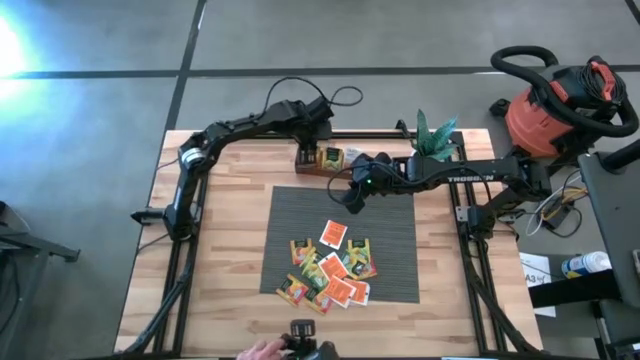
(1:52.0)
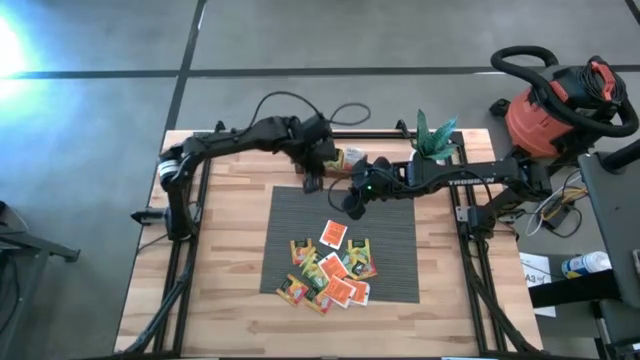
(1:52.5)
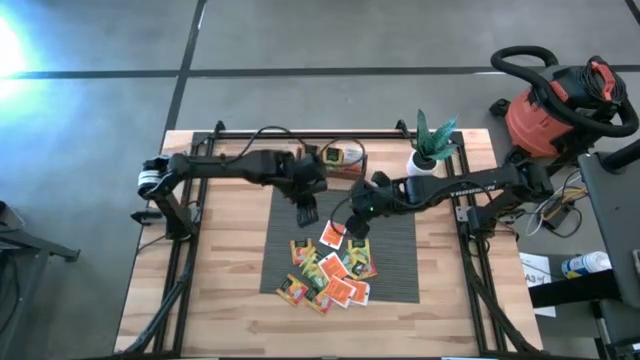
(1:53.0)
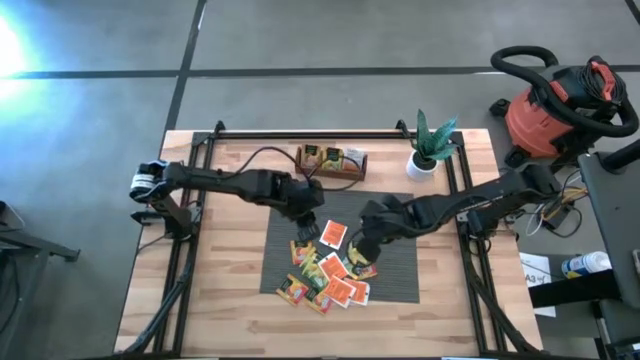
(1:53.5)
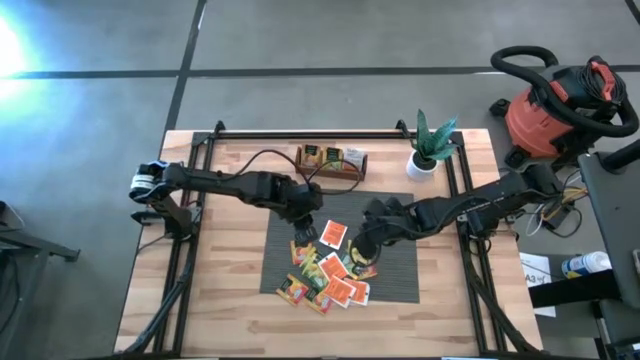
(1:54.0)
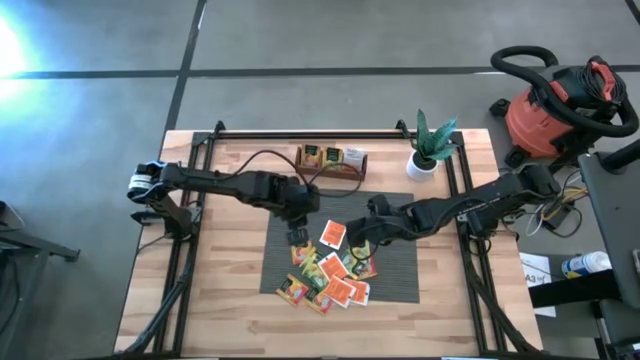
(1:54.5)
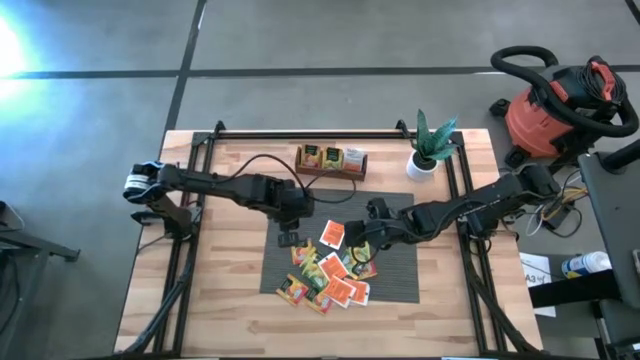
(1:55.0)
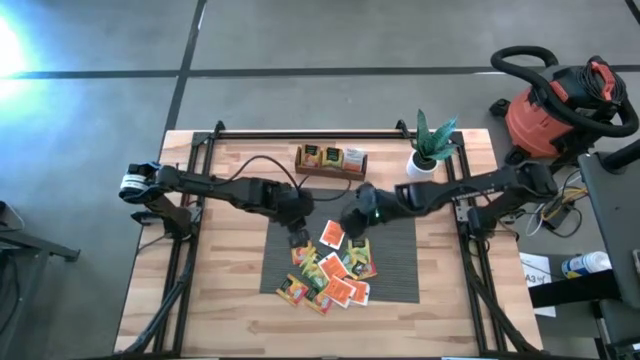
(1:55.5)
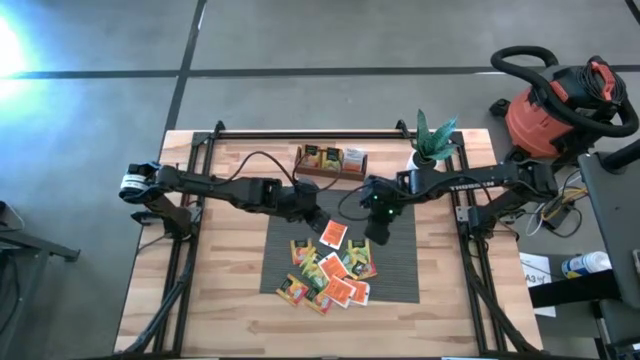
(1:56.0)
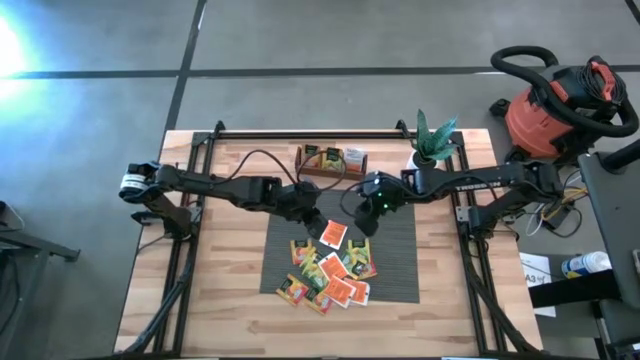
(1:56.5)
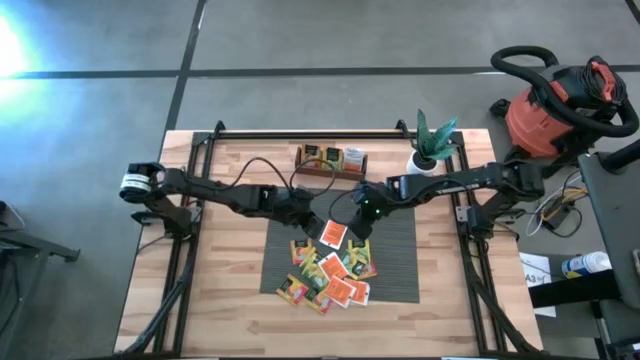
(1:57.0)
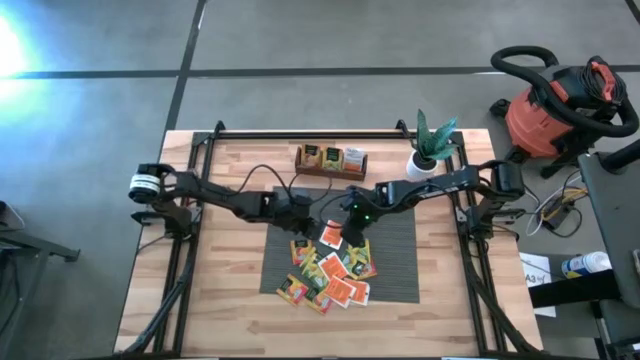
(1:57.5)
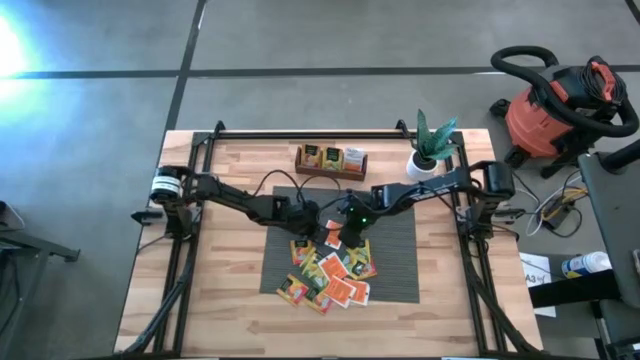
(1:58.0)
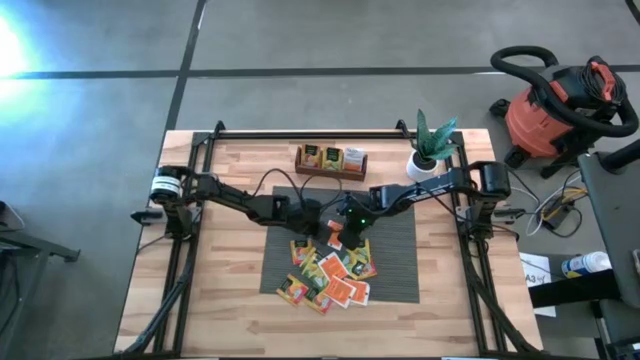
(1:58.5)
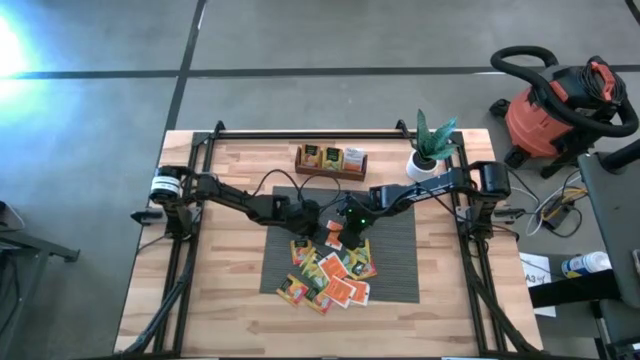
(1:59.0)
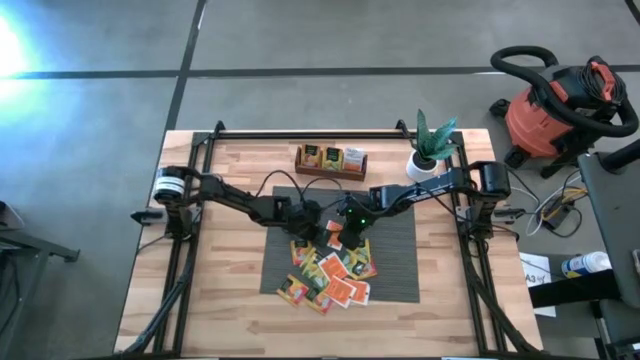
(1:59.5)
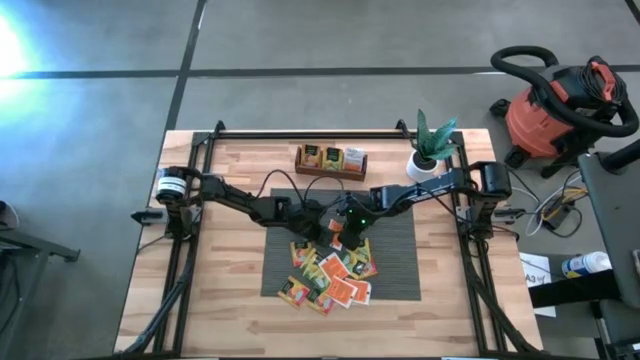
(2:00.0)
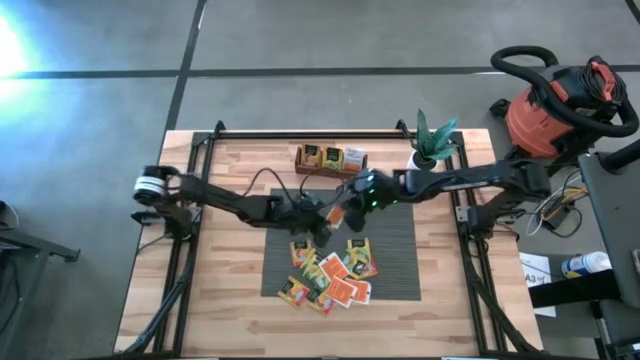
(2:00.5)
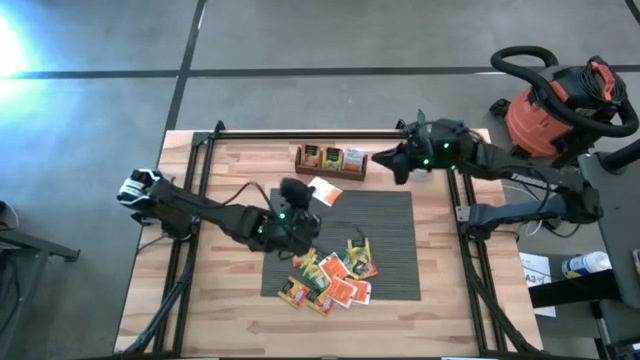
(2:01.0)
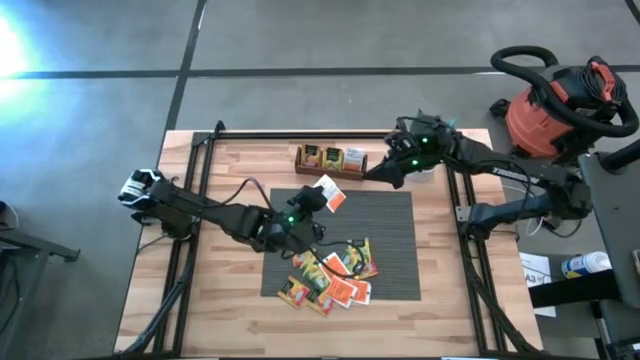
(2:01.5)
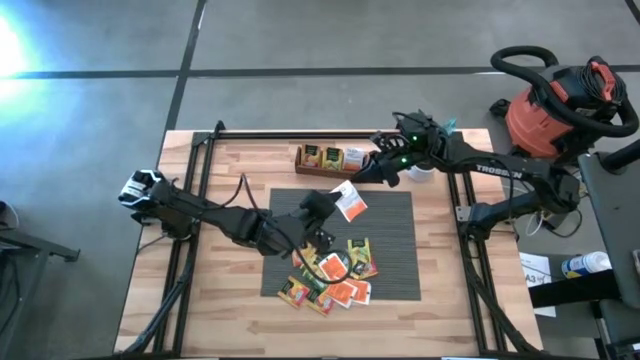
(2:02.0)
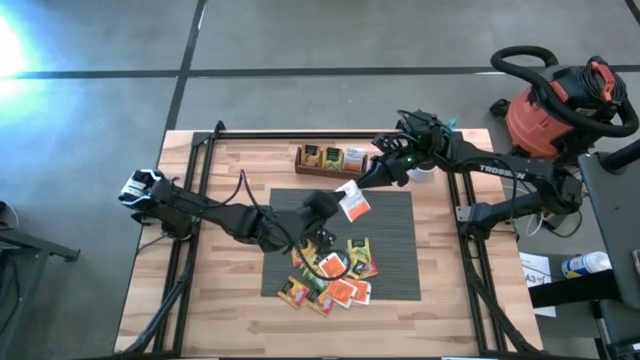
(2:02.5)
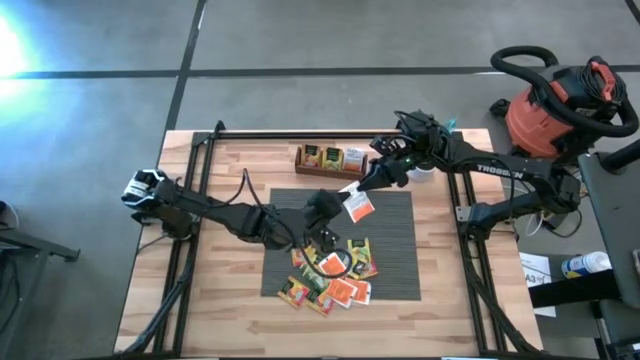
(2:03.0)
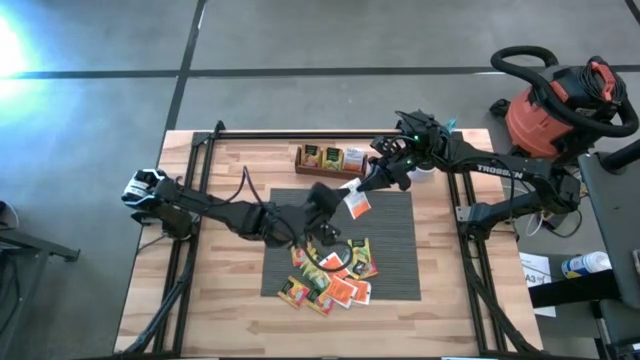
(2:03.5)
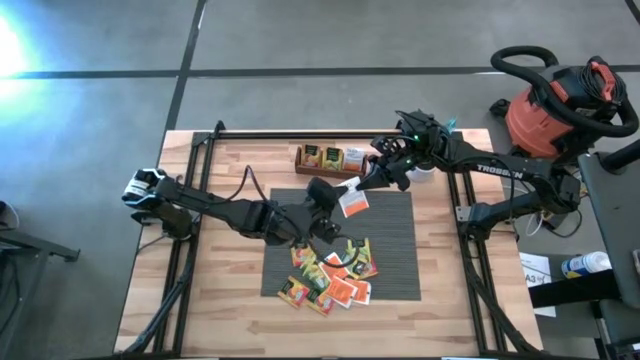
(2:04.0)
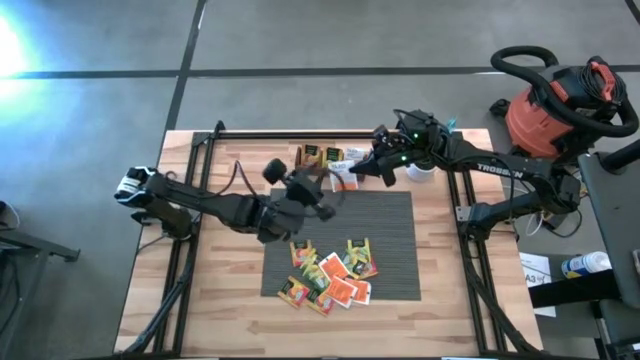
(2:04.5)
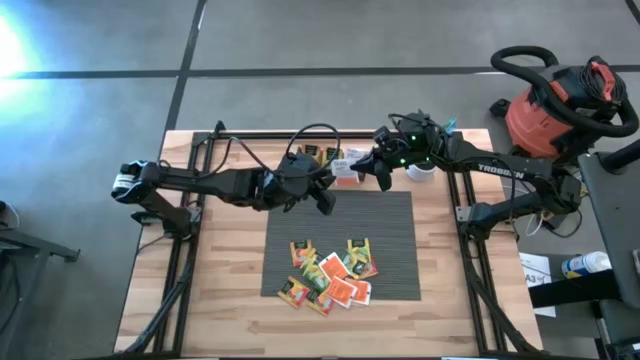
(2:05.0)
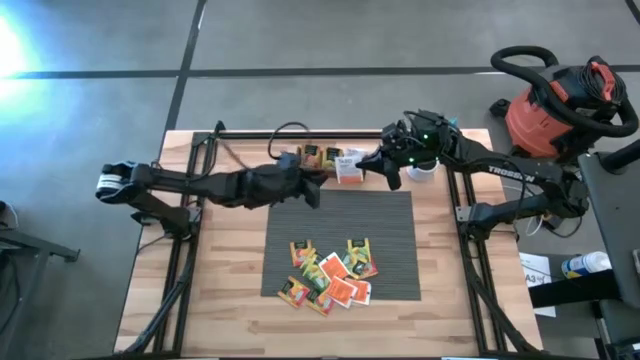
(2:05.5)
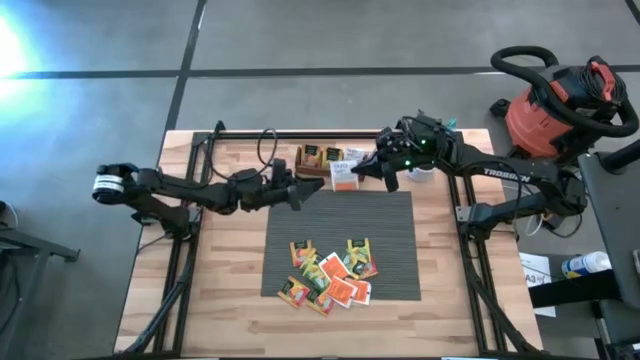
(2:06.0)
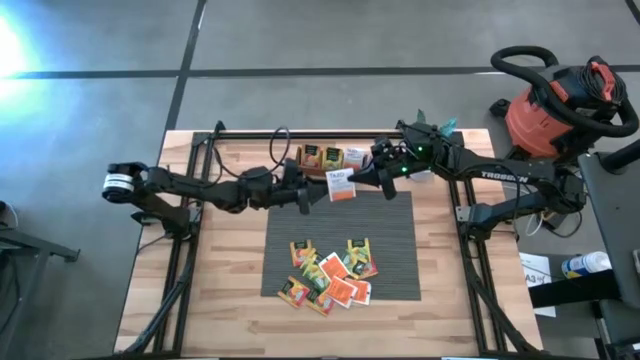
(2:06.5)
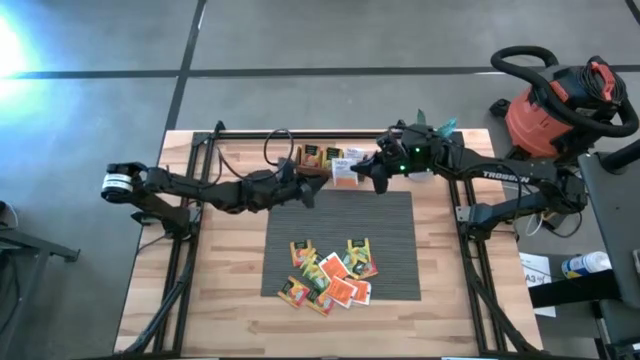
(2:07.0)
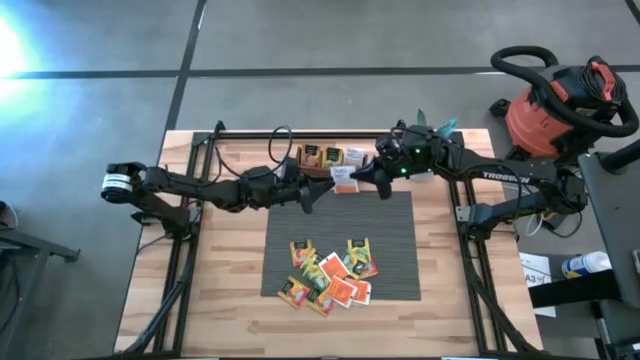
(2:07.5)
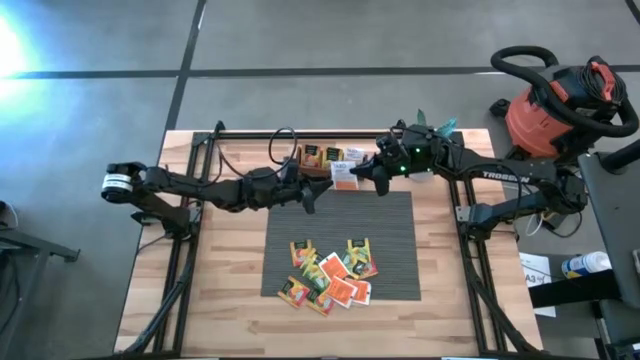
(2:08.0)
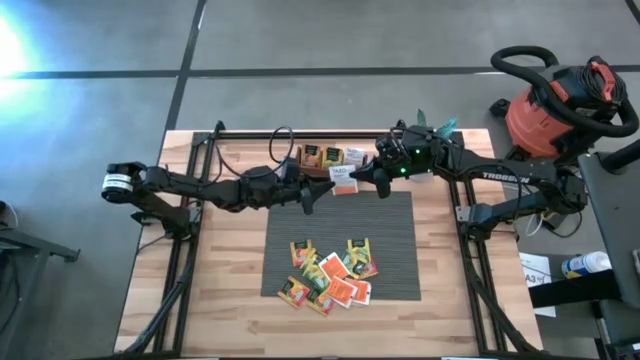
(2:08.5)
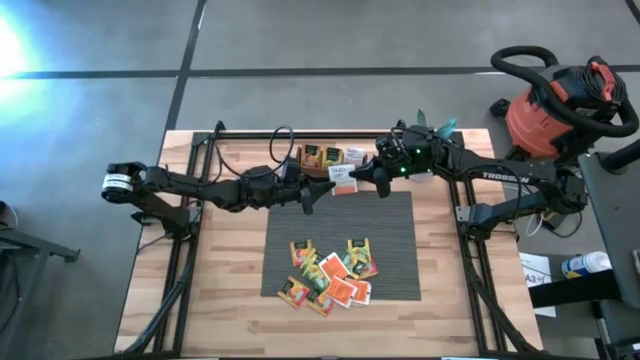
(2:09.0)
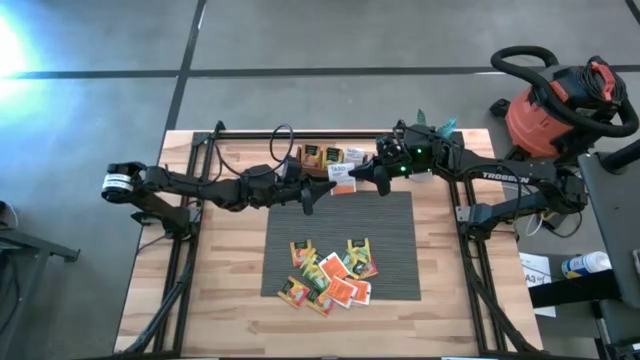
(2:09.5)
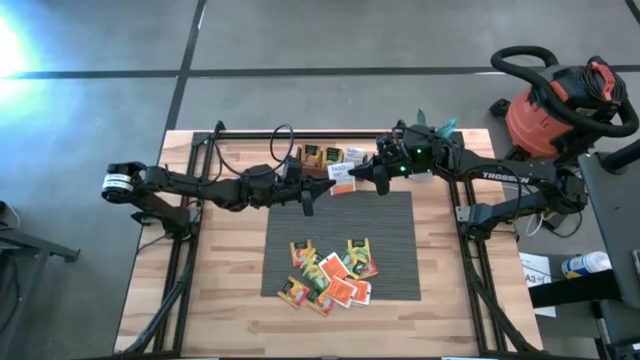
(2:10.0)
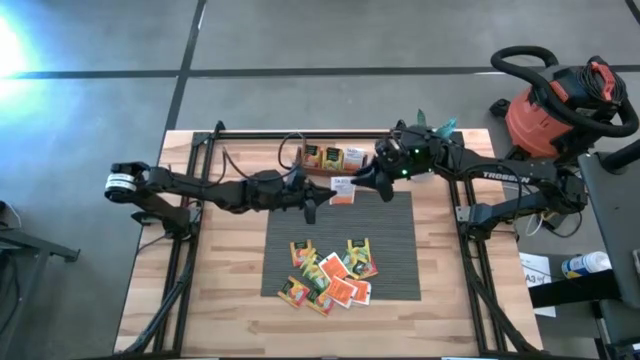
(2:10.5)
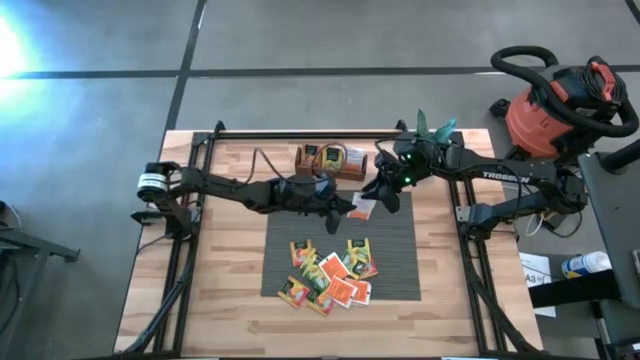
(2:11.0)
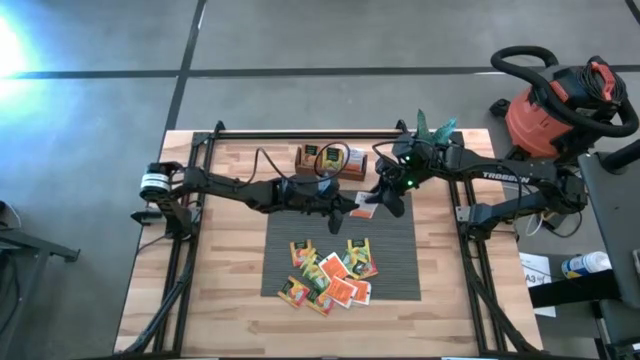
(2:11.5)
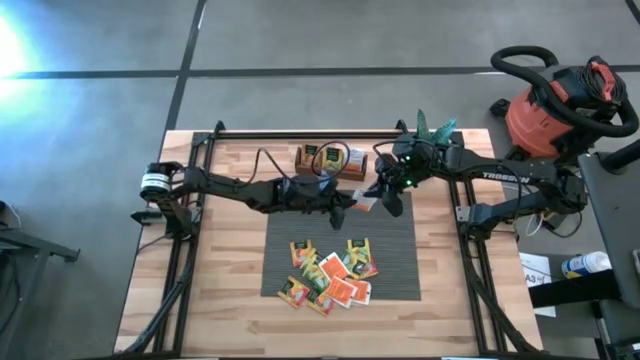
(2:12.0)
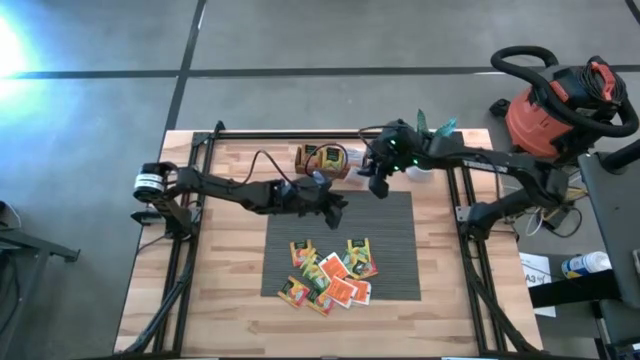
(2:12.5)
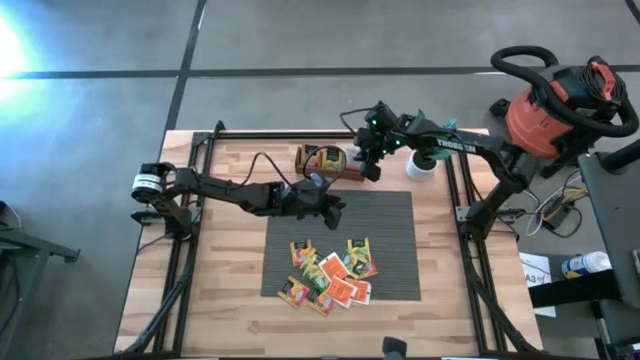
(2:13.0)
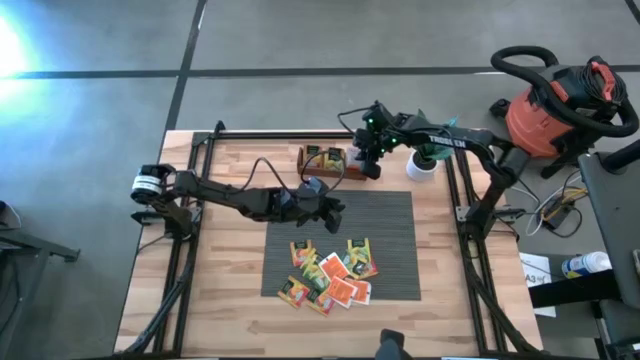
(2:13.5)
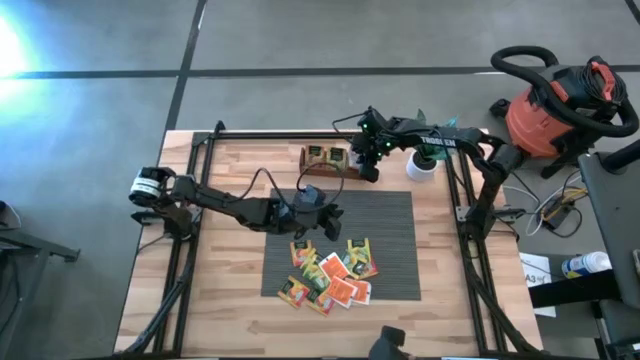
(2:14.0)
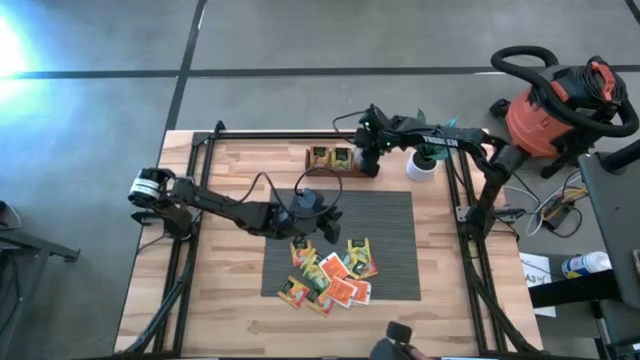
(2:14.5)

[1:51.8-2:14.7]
Task: Pick & Place Tea
Put the white orange tea bag into the right section of the wooden organizer
